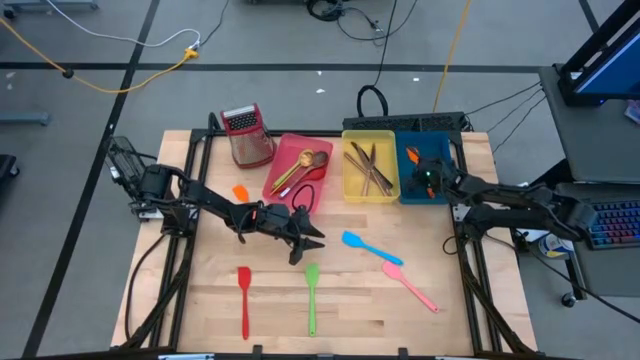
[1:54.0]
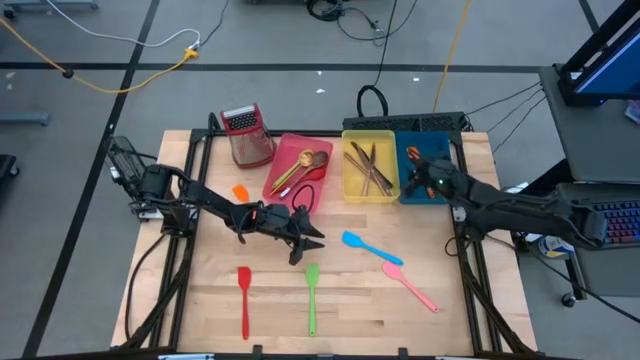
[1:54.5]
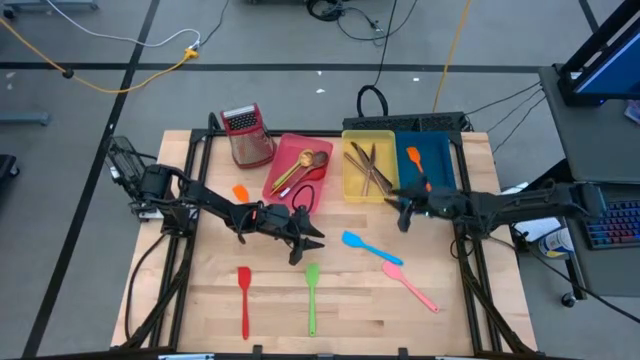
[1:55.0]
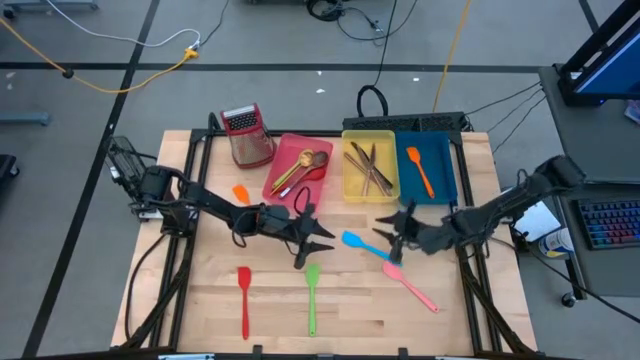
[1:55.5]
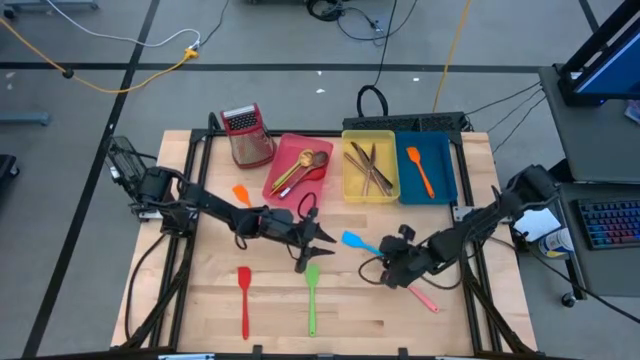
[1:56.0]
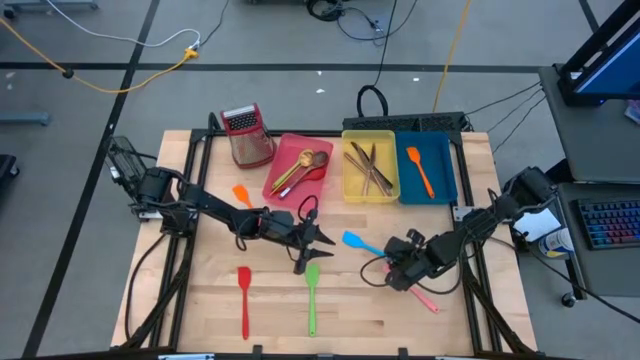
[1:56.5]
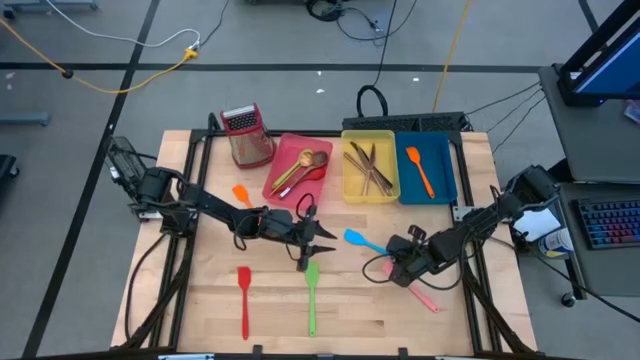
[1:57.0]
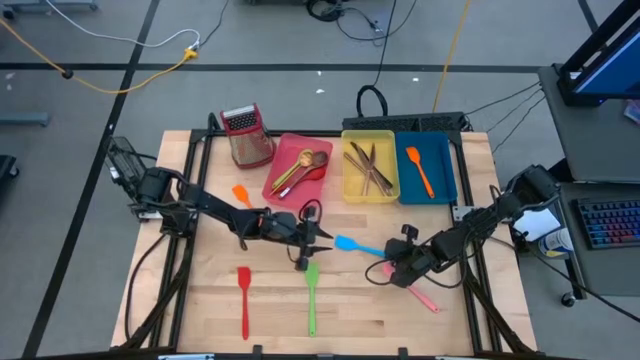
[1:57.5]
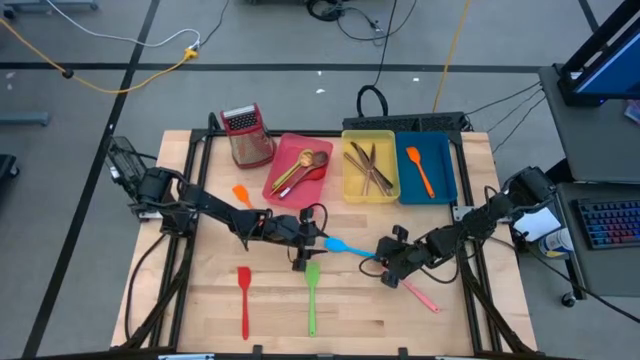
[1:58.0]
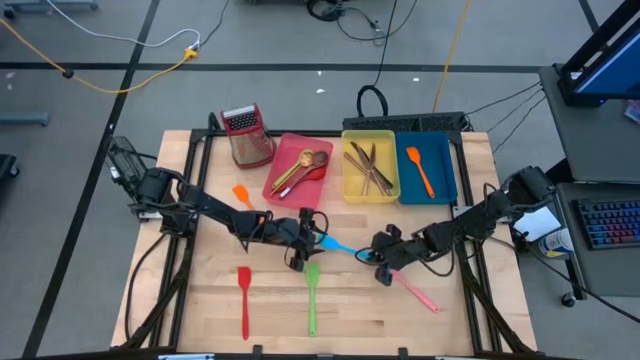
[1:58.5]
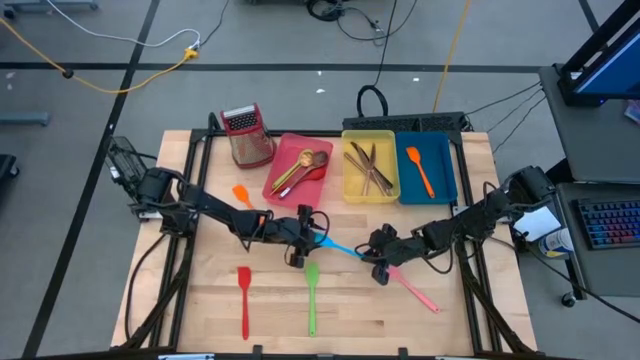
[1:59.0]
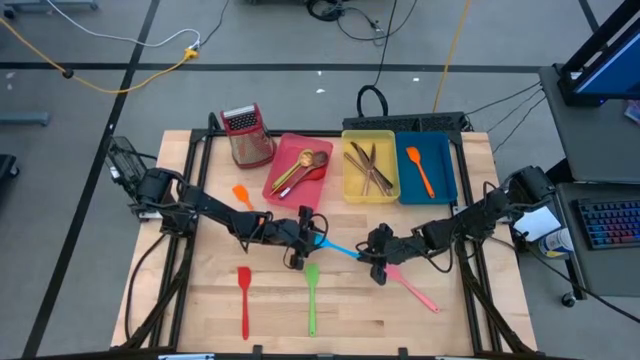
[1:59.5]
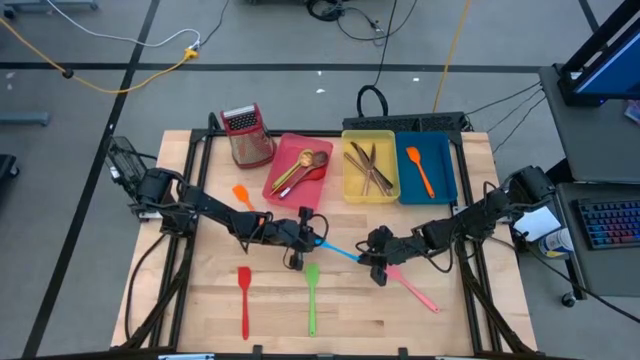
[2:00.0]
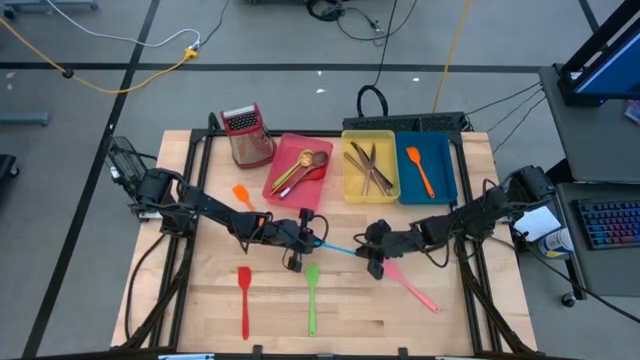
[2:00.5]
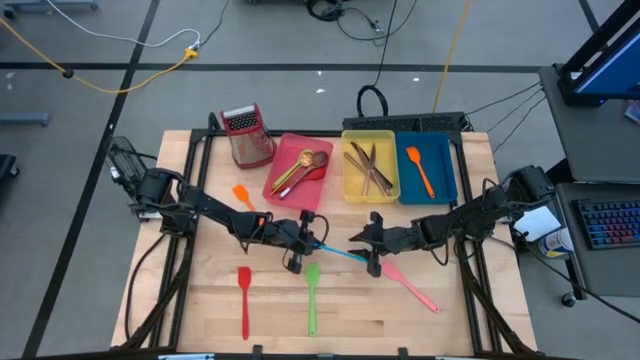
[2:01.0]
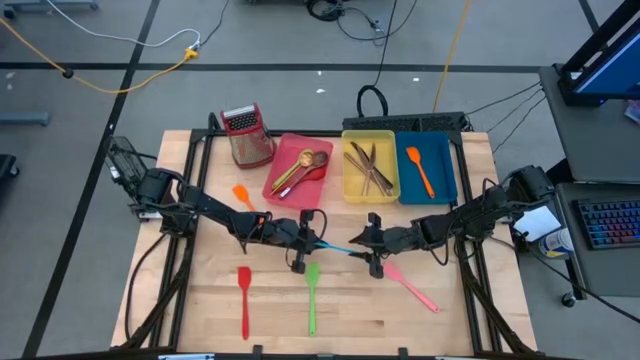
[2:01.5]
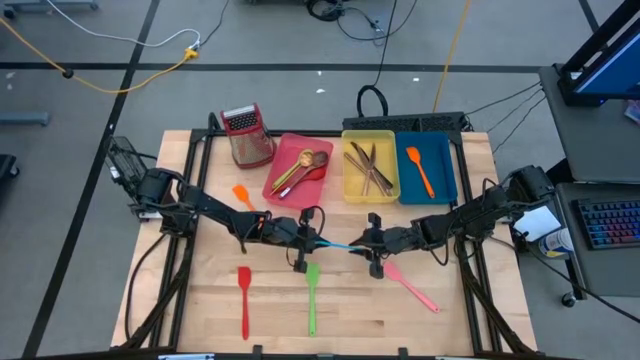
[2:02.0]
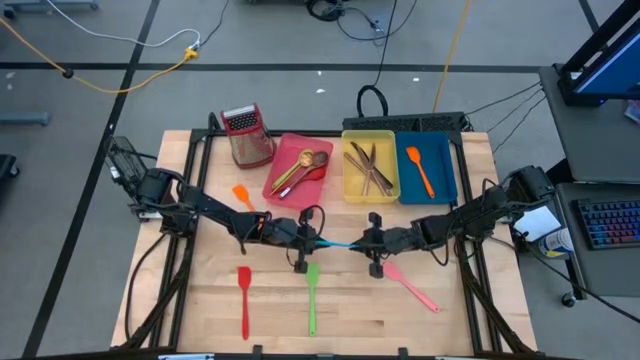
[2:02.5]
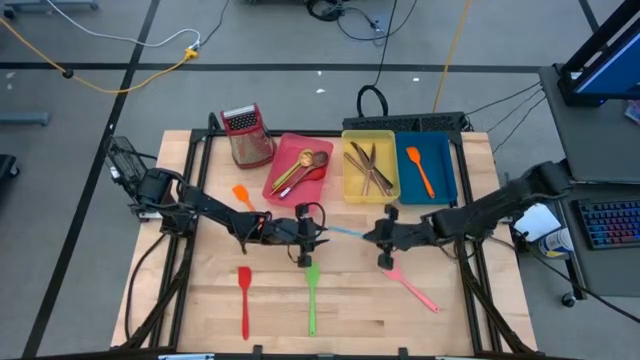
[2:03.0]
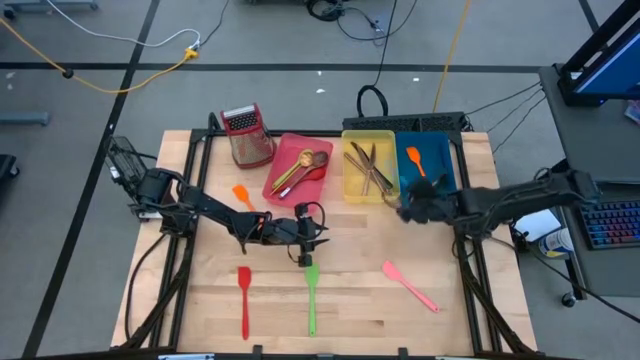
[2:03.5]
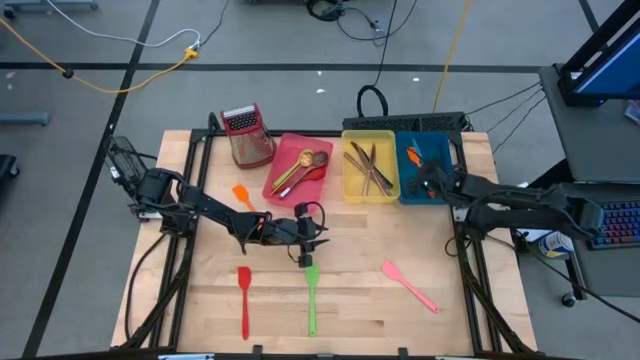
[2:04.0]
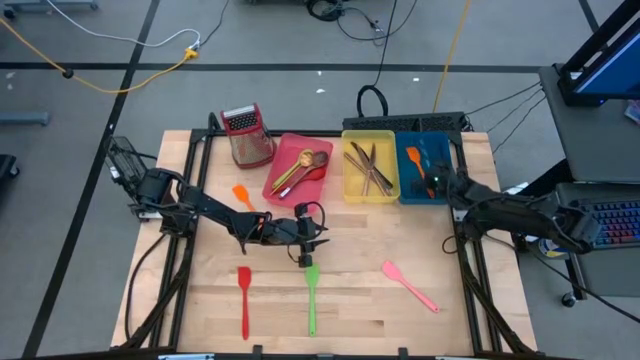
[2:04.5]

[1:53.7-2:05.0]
Task: Pick & Place Kitchen Items
Put the blue serving spoon into the blue bin

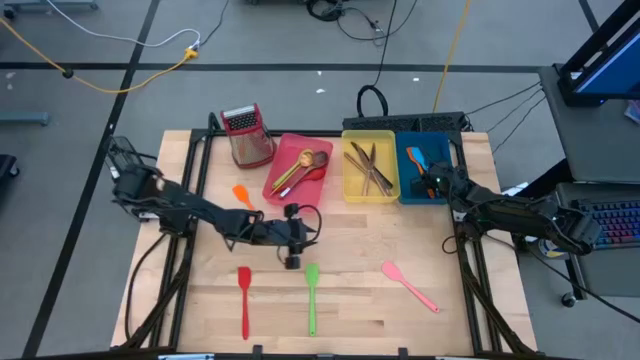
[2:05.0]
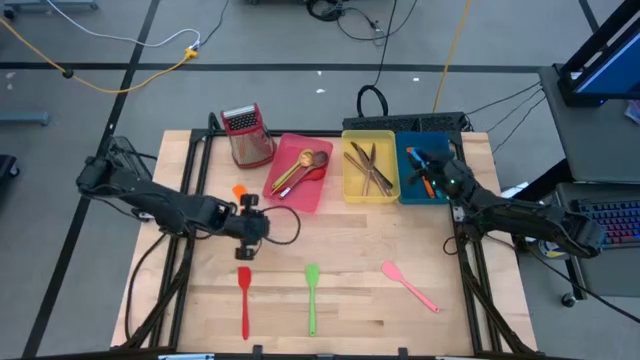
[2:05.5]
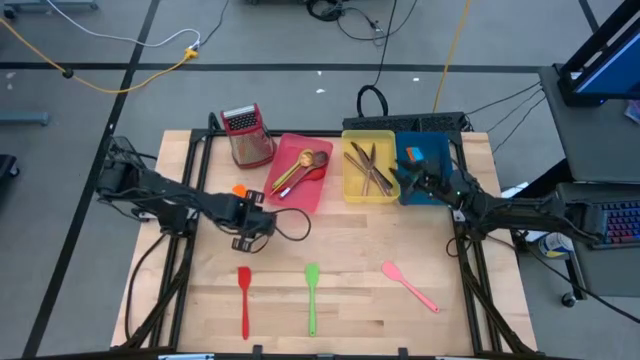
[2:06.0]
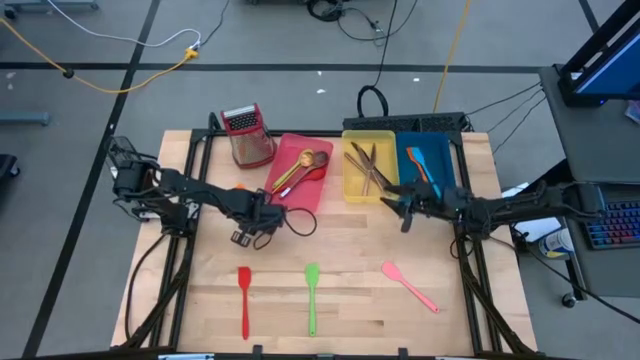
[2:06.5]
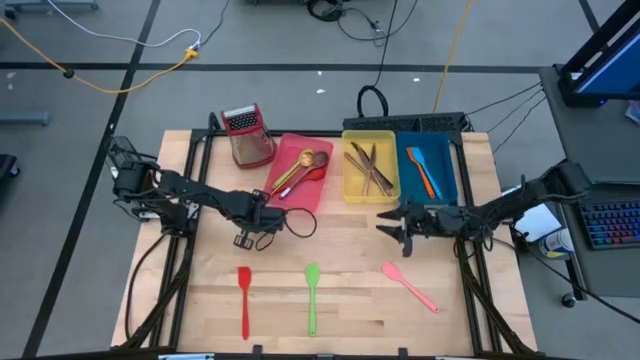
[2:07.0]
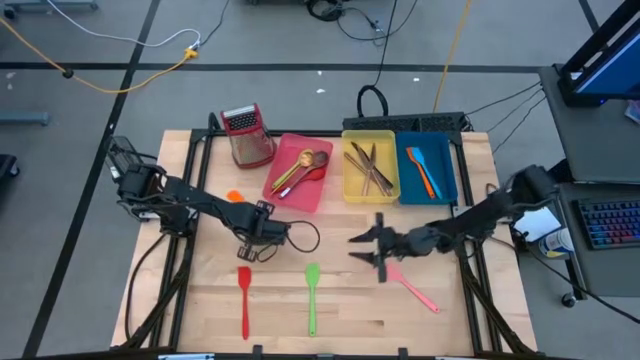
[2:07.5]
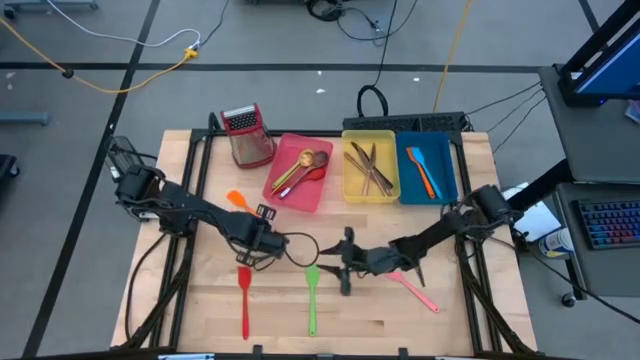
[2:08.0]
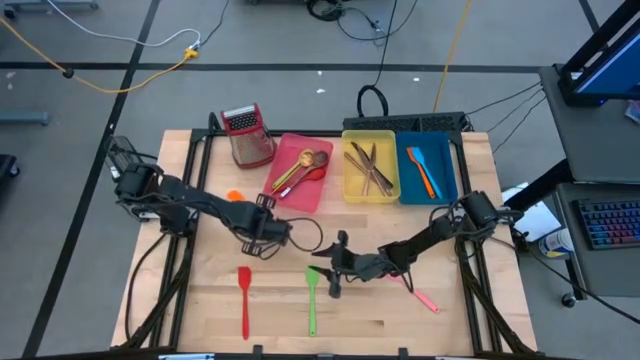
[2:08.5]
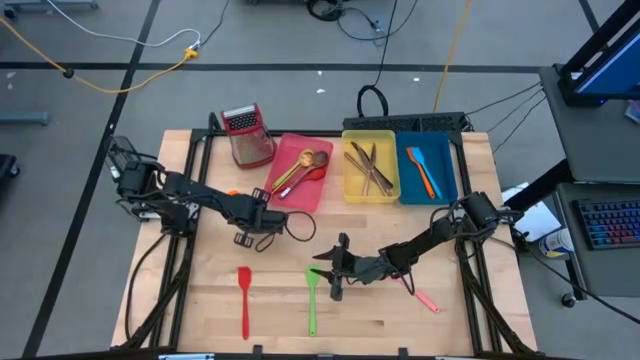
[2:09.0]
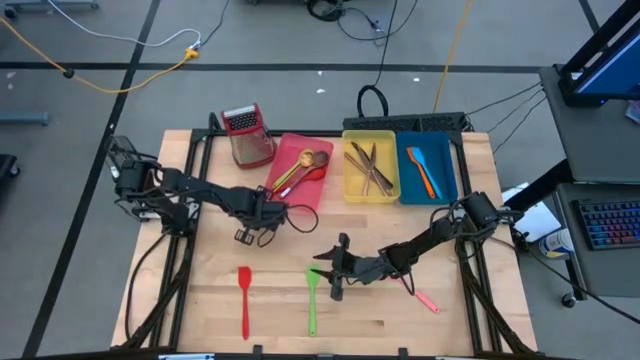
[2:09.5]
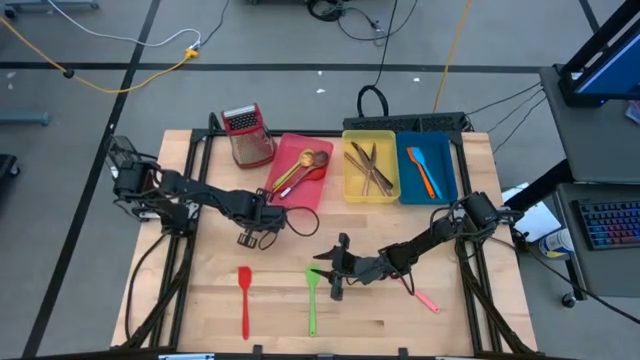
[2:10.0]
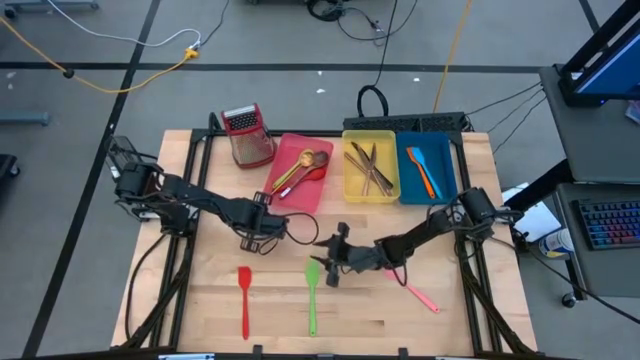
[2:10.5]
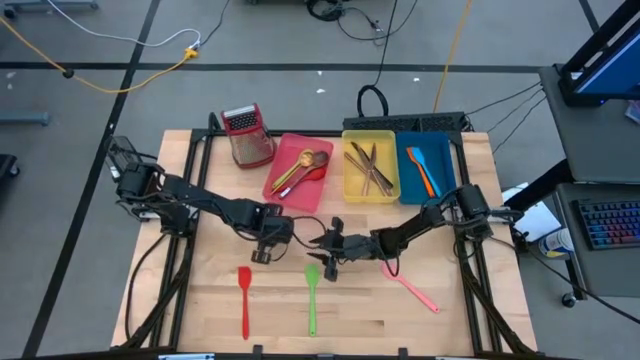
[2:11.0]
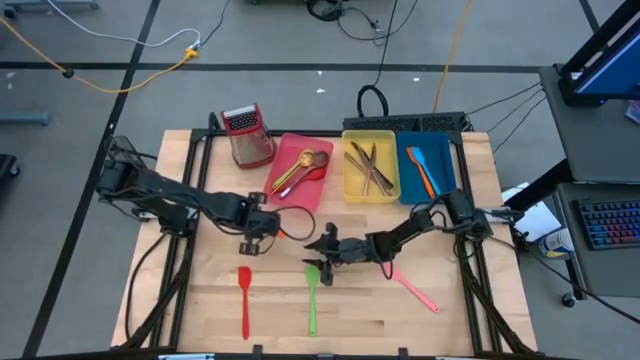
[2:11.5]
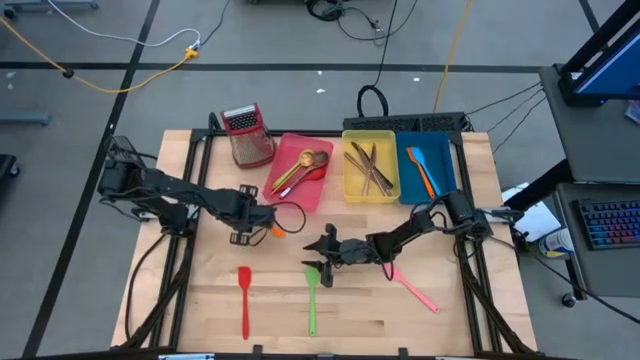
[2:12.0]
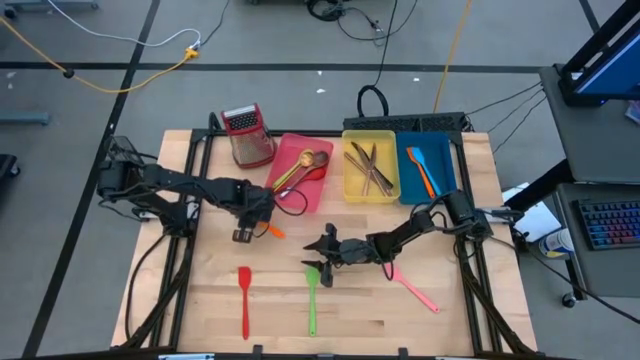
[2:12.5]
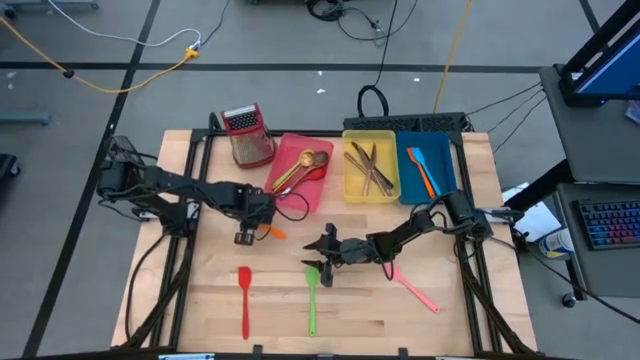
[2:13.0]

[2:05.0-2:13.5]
Put the orange serving spoon into the blue bin

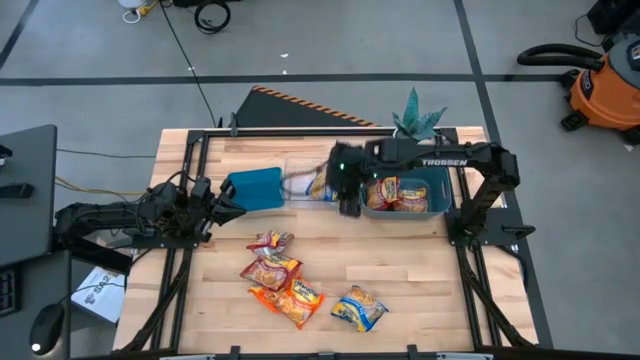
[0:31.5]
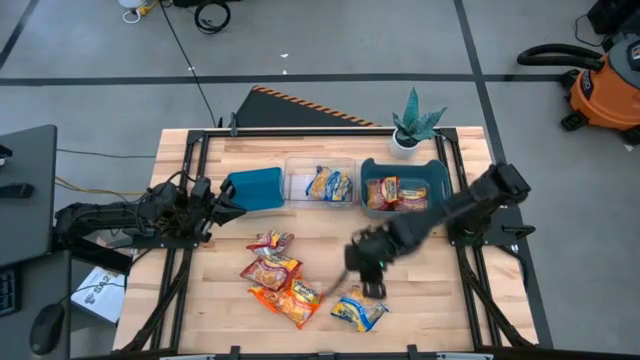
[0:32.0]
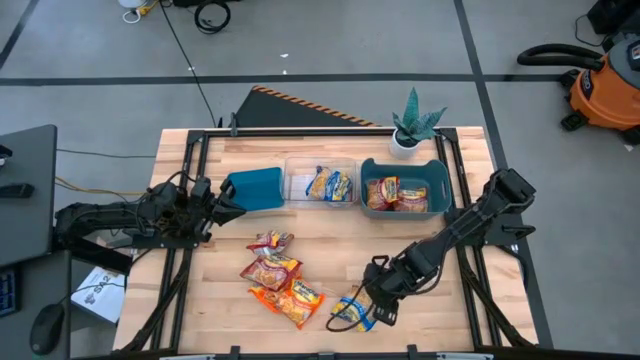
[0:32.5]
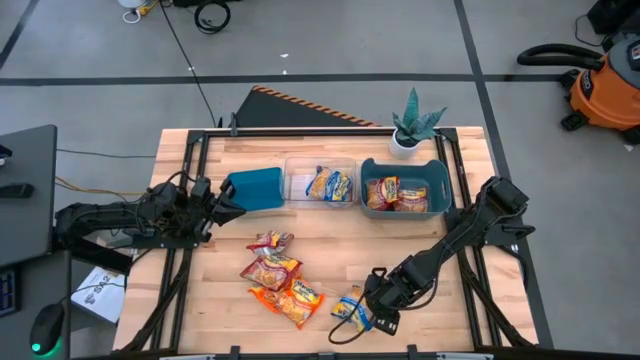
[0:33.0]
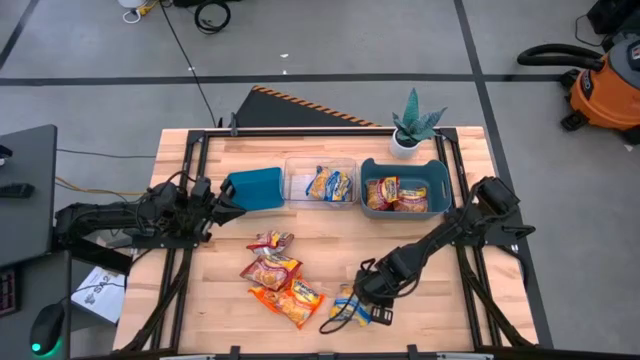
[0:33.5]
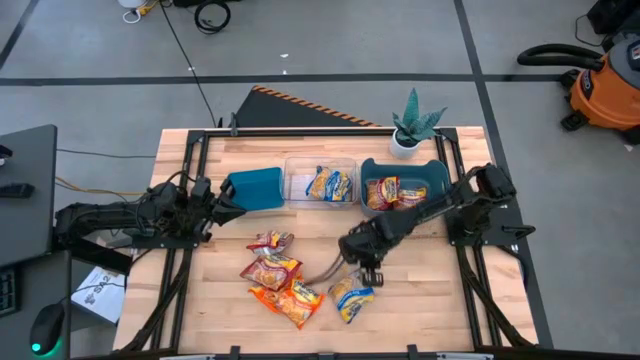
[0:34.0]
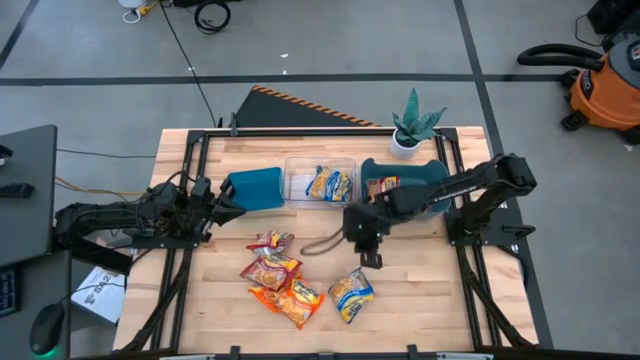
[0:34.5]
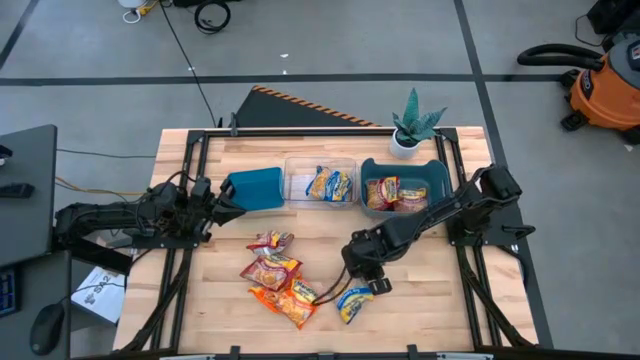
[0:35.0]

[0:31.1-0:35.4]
Task: Sort Maruchan noodles
Put the blue noddle pack into the transparent bin
